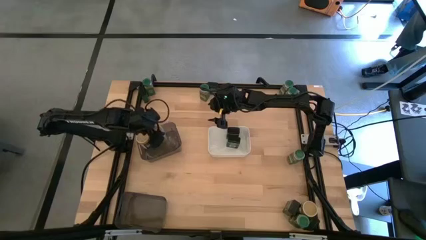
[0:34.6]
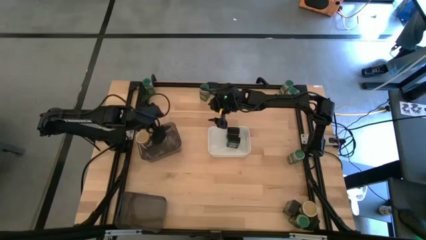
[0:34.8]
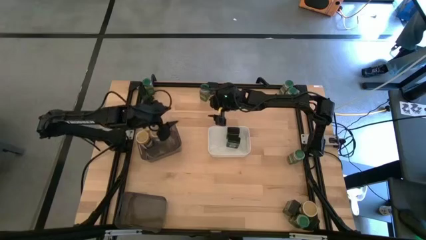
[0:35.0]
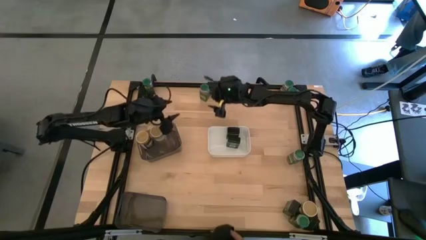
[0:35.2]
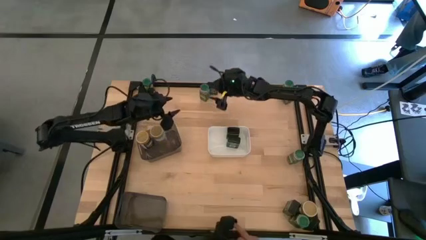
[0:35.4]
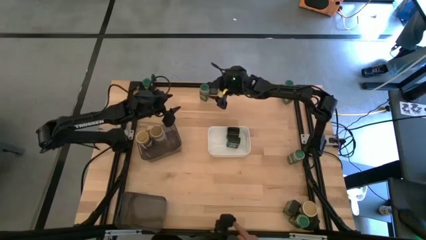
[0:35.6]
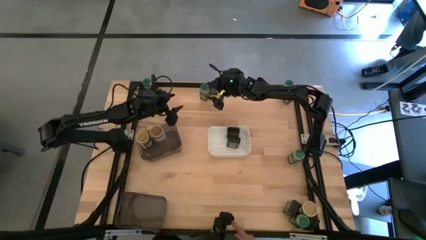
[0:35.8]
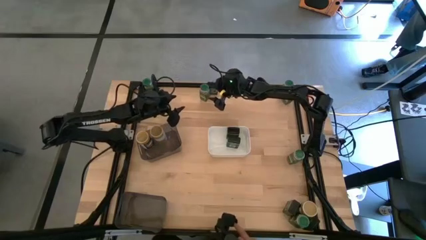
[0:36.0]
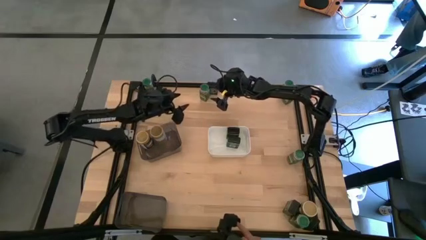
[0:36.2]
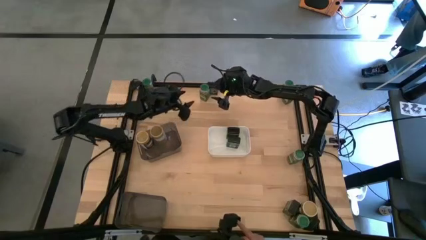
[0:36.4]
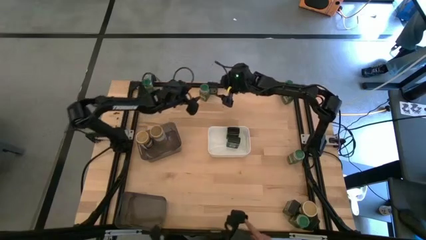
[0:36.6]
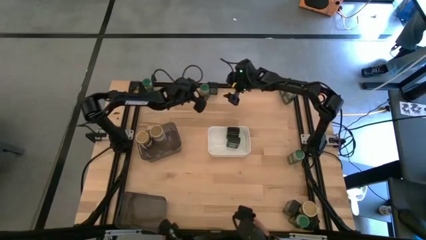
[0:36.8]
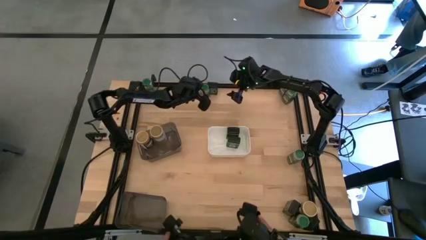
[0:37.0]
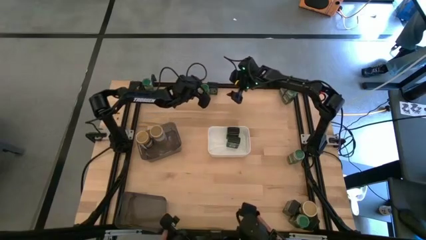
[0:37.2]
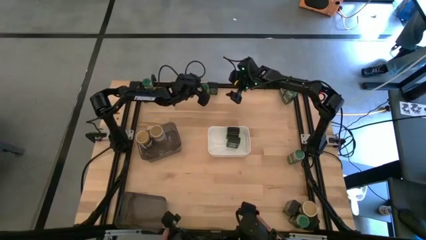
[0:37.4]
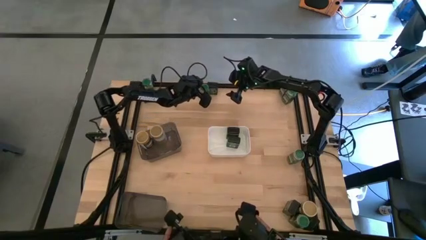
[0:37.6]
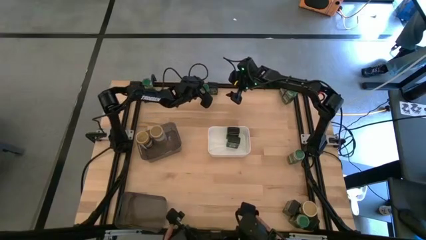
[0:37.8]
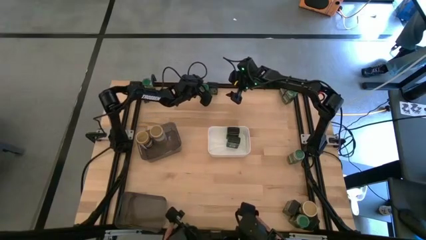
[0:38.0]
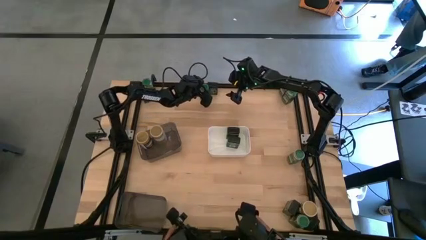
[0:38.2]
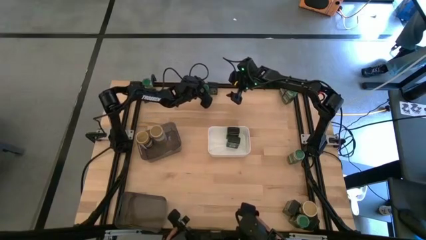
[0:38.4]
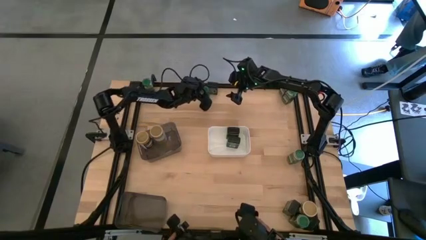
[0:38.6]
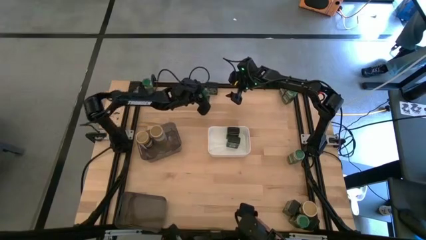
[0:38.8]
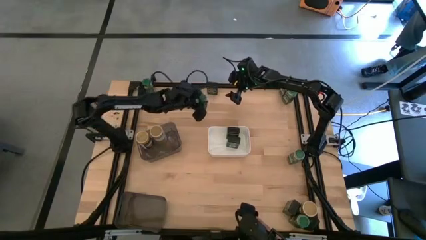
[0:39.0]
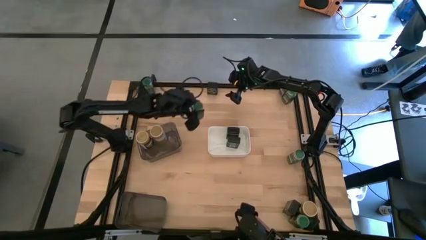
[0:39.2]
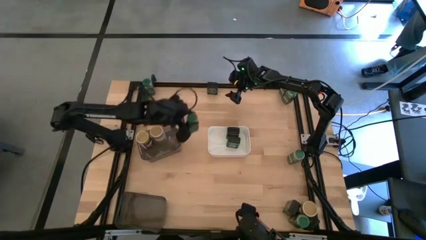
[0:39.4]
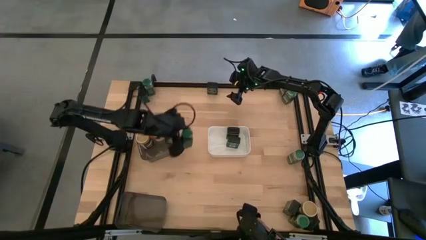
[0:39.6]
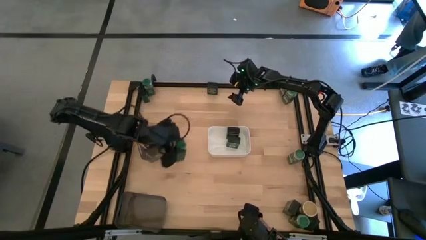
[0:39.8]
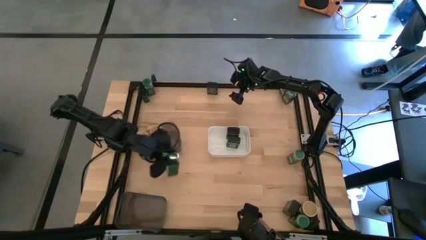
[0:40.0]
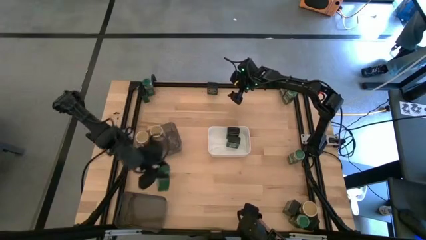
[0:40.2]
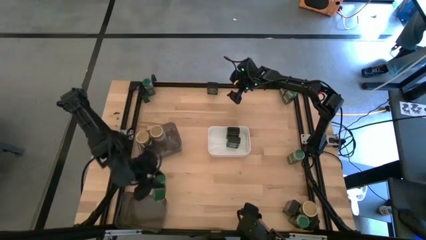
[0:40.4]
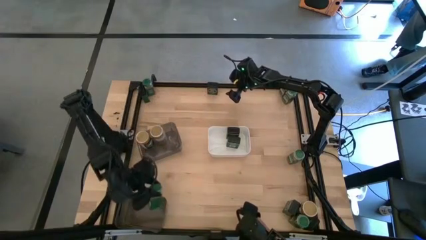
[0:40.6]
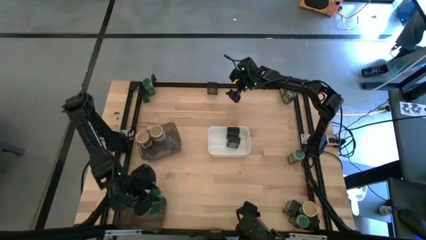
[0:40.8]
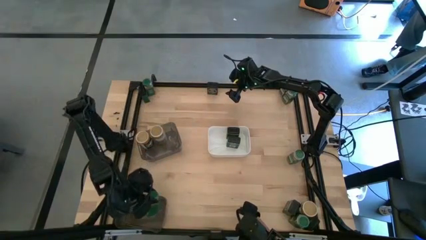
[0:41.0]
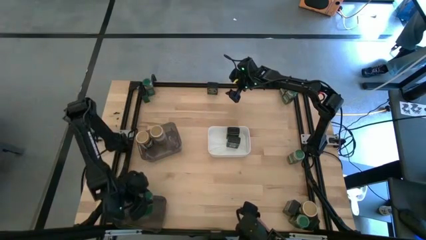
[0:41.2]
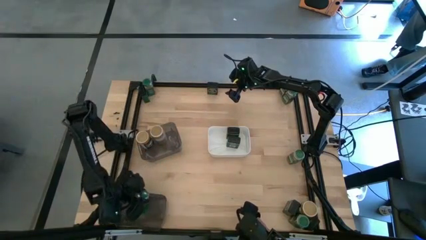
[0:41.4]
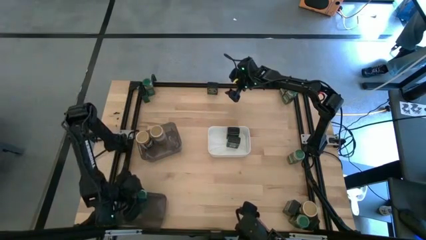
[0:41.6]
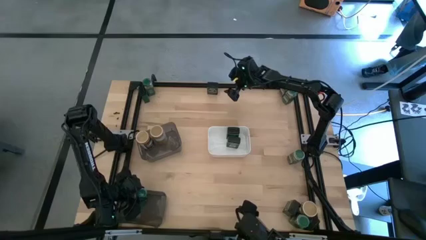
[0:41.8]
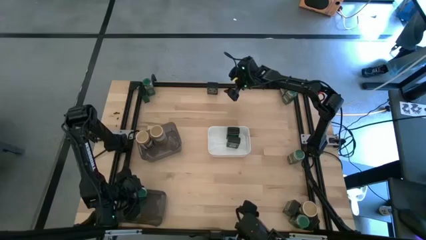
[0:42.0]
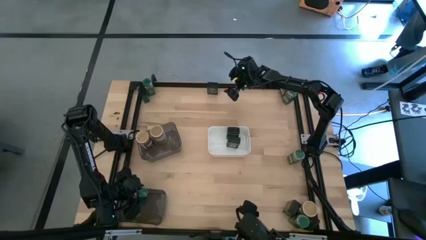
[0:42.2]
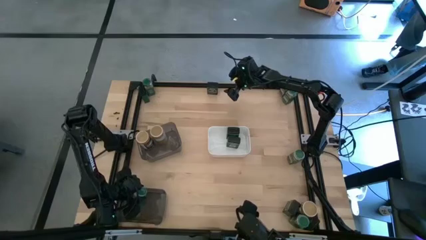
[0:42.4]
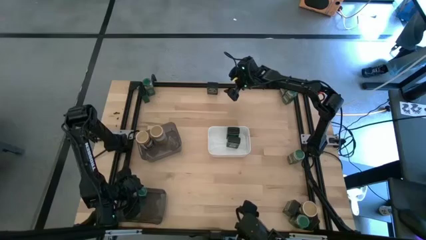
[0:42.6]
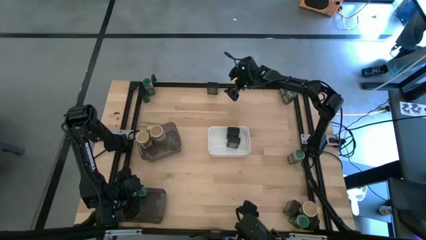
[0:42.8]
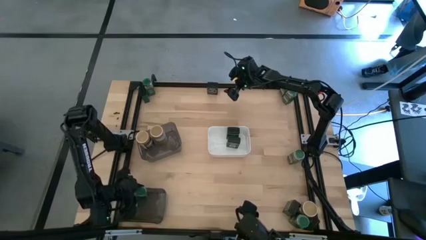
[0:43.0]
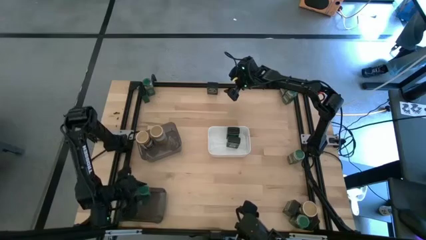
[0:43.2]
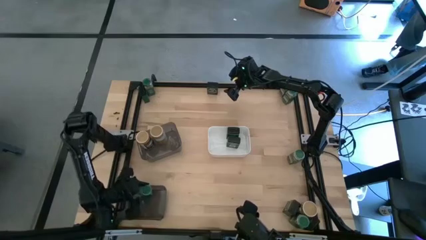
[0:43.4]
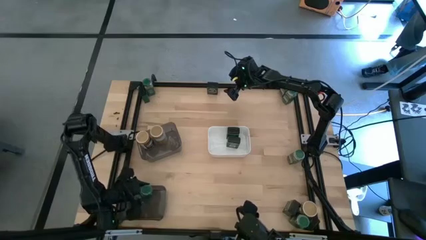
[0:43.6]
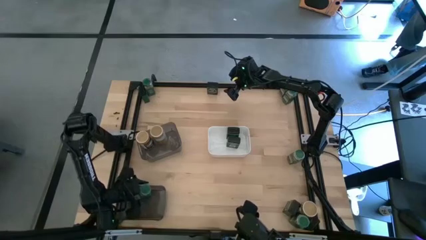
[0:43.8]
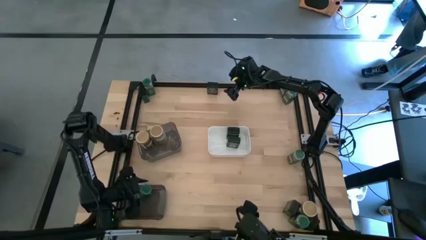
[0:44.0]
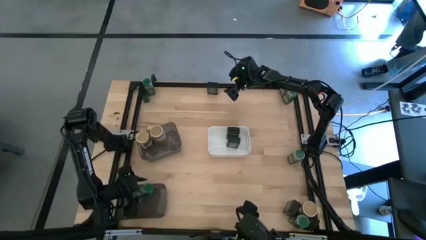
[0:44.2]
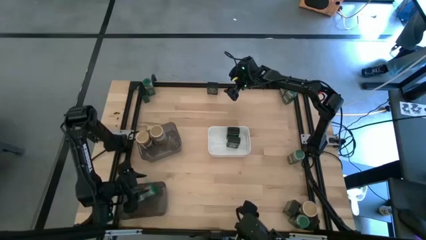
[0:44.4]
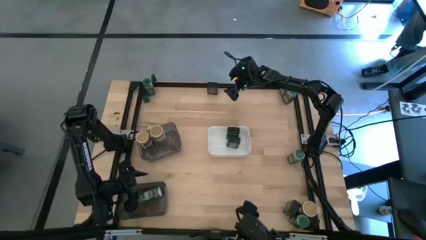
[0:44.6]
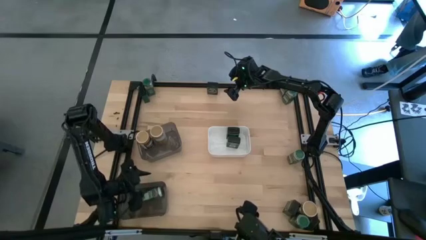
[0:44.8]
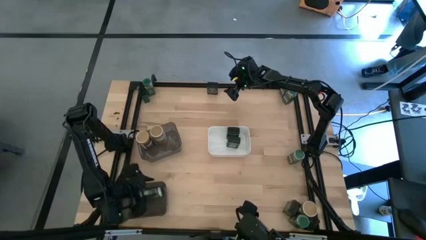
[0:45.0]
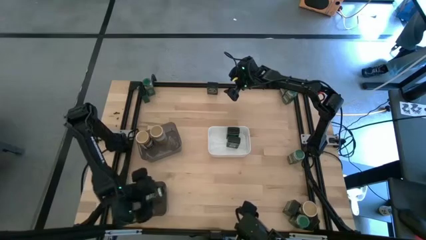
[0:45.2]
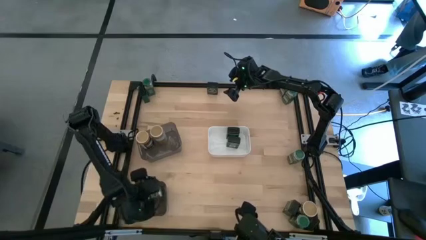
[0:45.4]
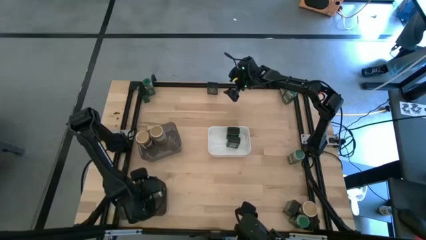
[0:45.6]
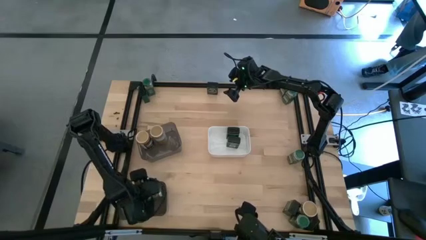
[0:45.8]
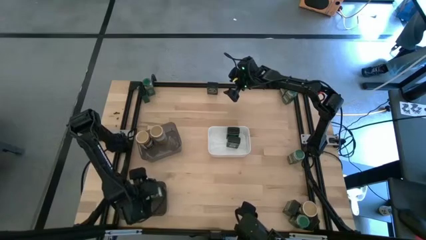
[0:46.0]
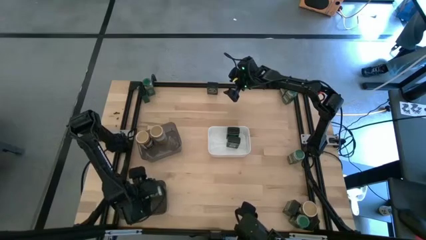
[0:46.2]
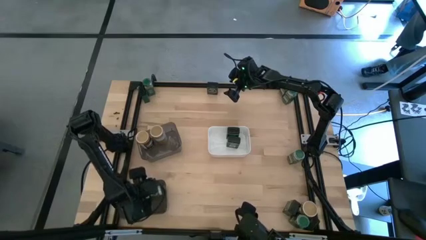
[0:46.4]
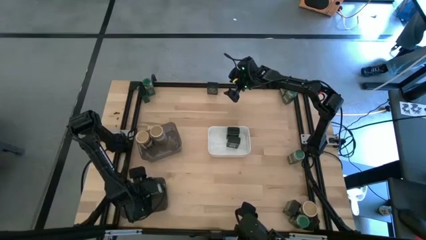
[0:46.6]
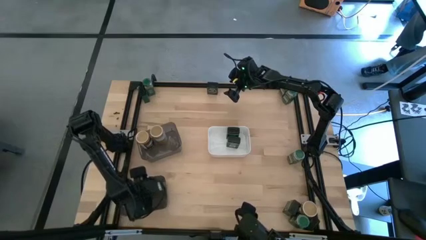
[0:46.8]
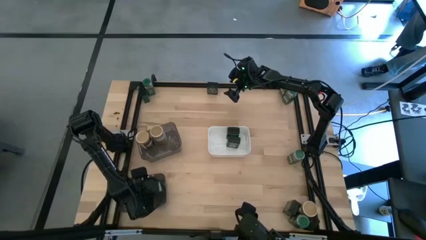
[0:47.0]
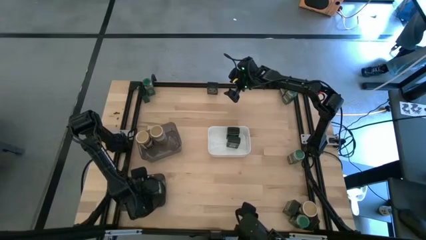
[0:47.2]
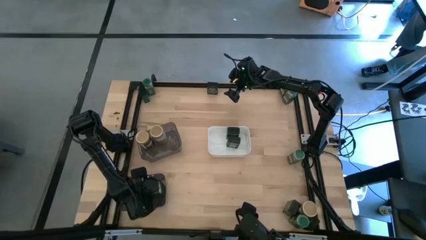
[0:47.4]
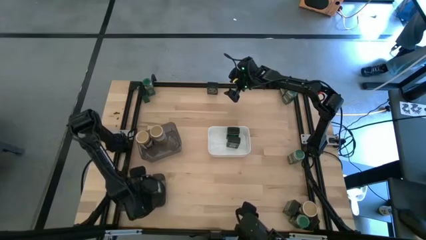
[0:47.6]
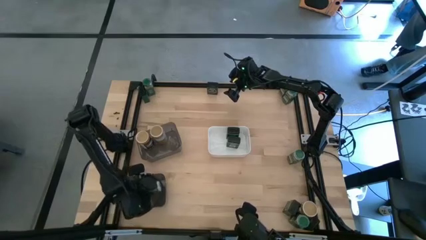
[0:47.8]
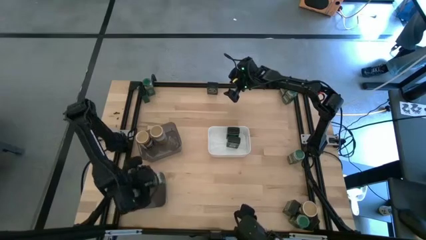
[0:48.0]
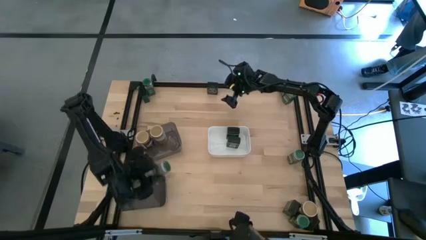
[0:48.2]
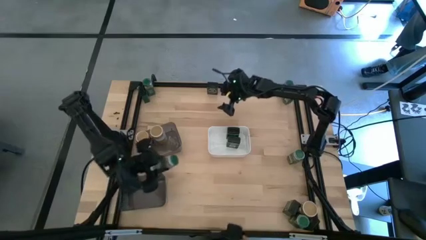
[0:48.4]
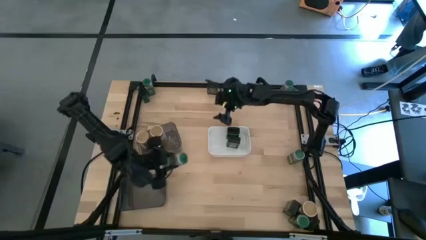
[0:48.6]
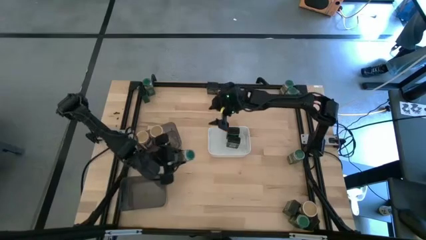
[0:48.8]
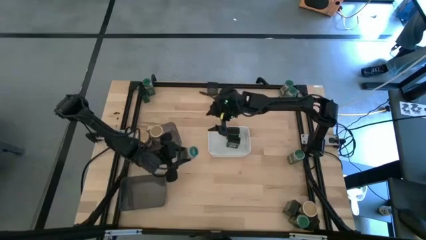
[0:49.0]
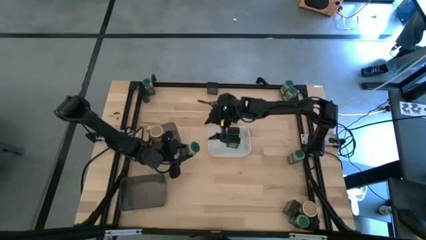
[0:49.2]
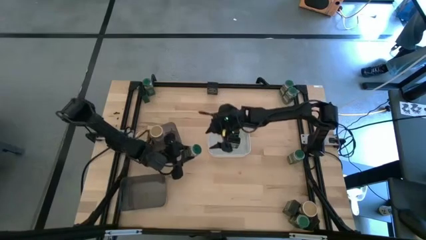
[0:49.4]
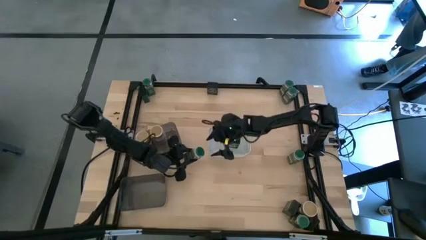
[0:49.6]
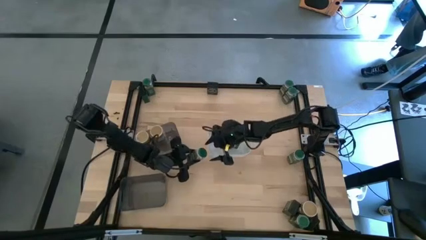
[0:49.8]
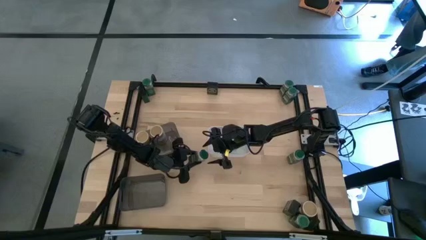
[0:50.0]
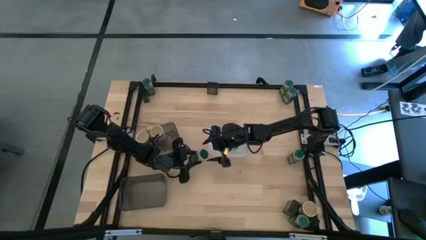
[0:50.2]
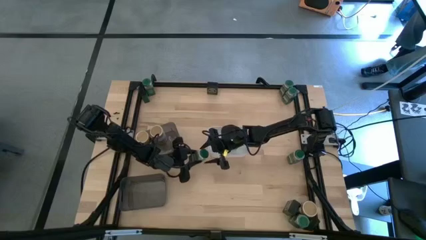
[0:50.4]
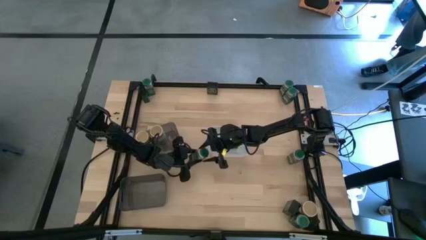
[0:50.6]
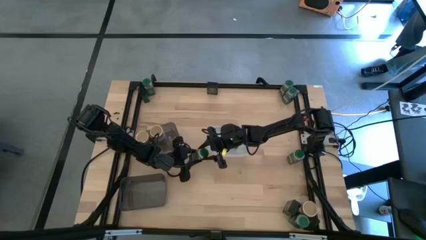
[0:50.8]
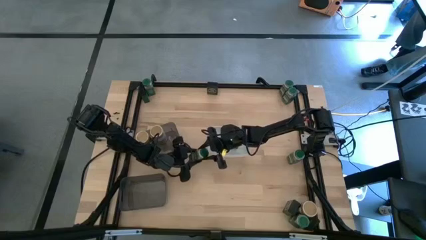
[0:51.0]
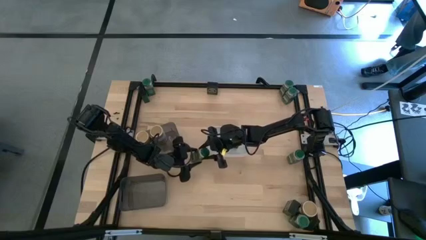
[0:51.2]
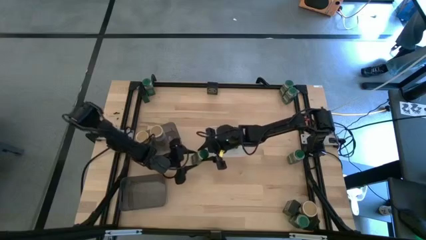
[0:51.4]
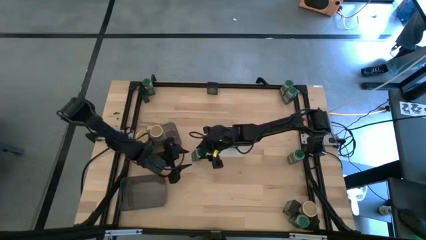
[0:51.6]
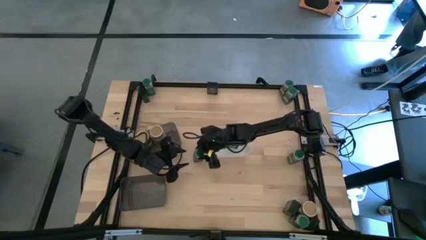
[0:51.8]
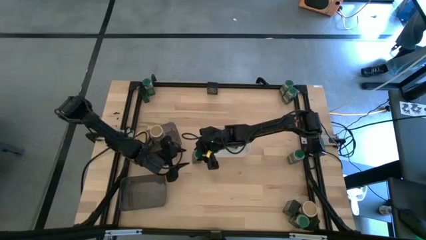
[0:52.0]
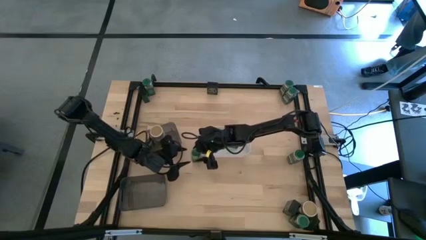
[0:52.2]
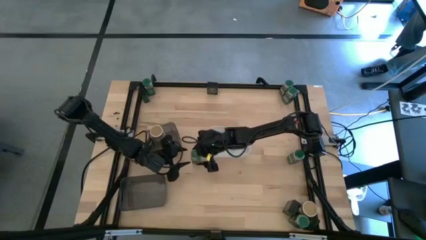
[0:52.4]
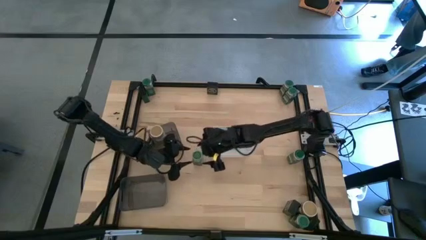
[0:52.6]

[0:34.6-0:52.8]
Task: Sort spices by type
Put the green seasoning bottle into the bottom black bin
